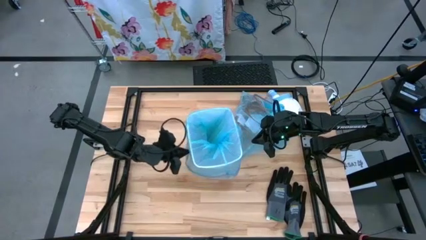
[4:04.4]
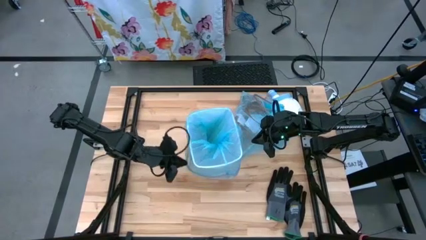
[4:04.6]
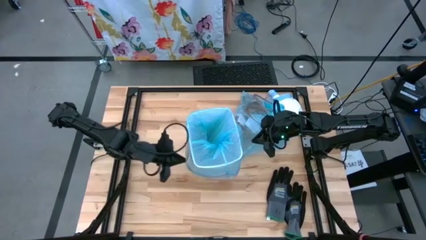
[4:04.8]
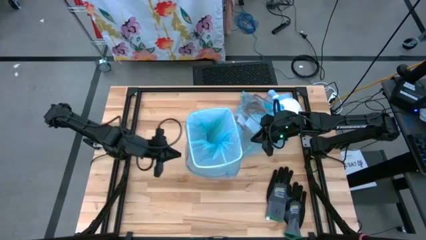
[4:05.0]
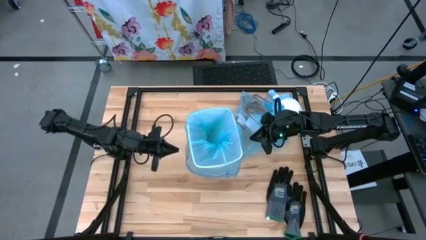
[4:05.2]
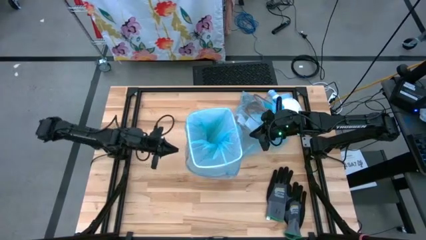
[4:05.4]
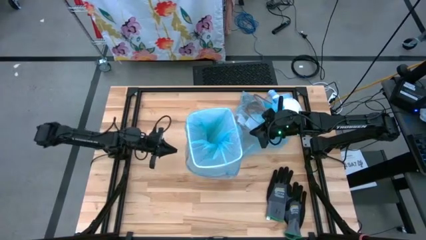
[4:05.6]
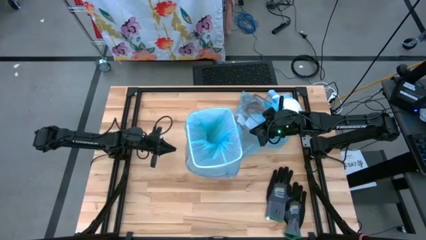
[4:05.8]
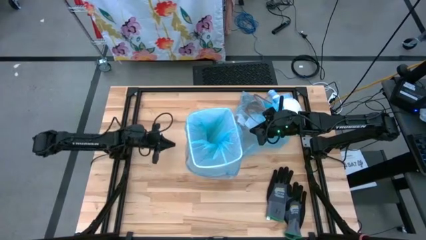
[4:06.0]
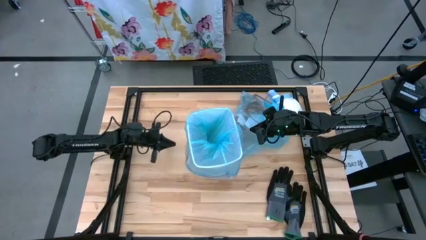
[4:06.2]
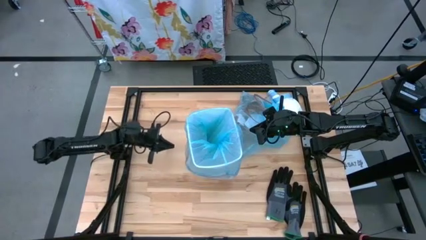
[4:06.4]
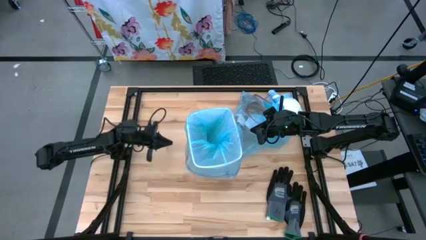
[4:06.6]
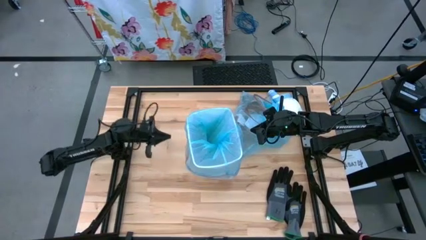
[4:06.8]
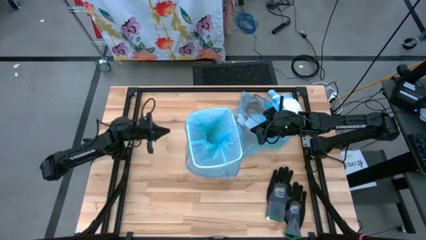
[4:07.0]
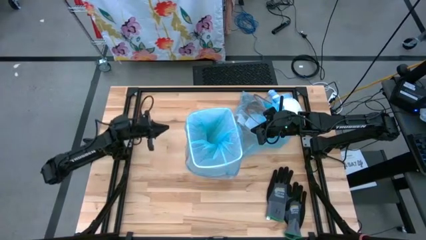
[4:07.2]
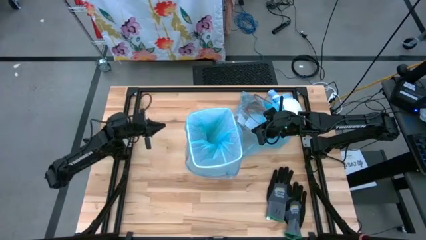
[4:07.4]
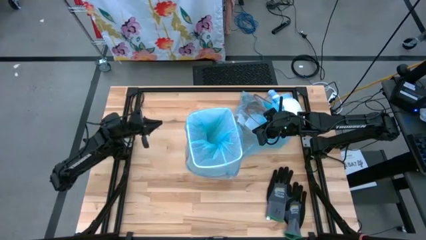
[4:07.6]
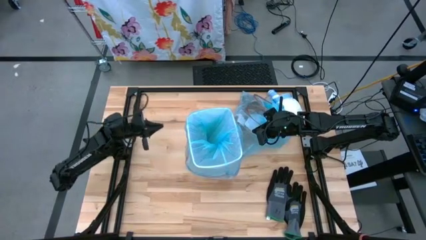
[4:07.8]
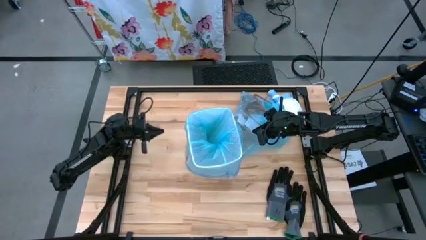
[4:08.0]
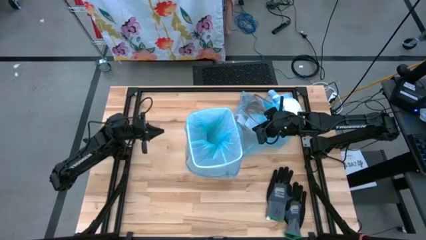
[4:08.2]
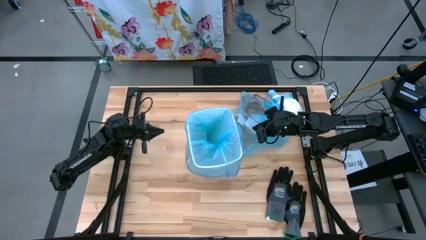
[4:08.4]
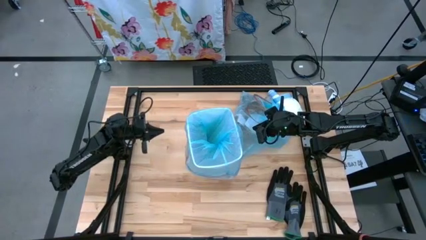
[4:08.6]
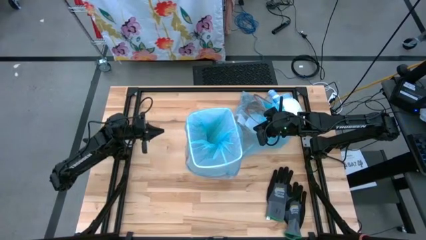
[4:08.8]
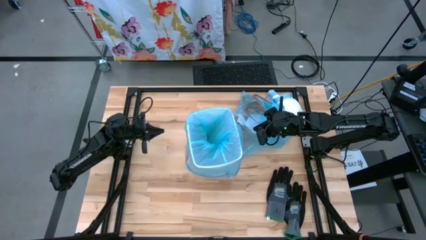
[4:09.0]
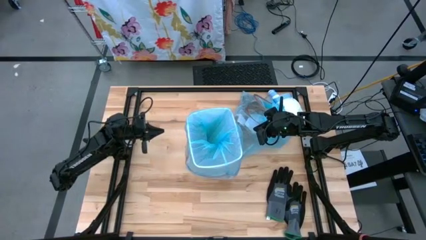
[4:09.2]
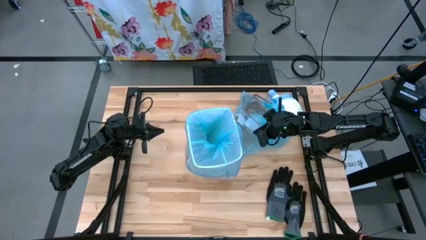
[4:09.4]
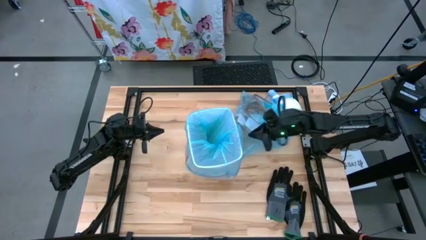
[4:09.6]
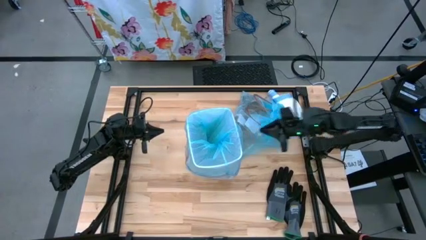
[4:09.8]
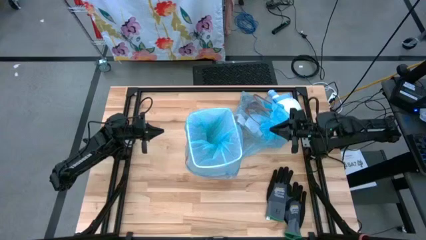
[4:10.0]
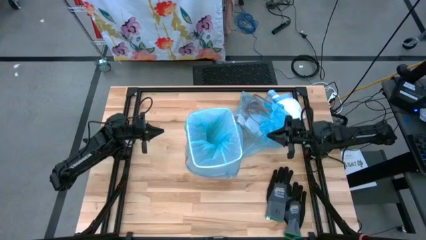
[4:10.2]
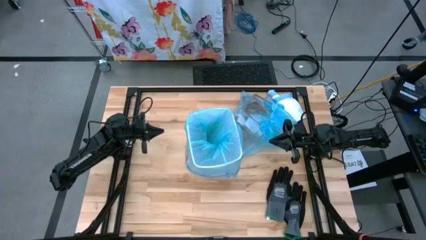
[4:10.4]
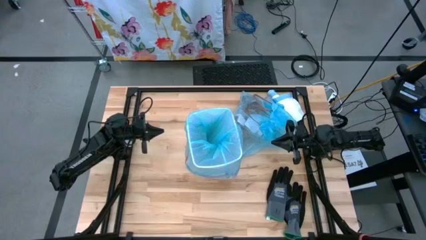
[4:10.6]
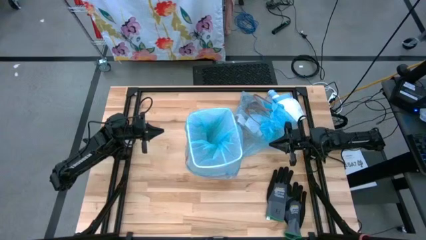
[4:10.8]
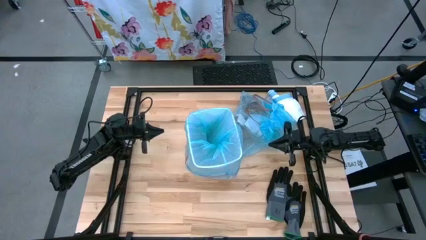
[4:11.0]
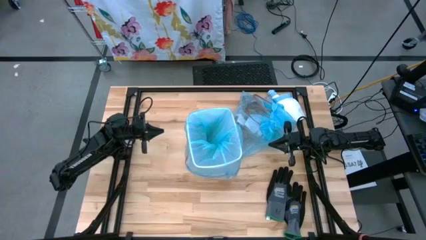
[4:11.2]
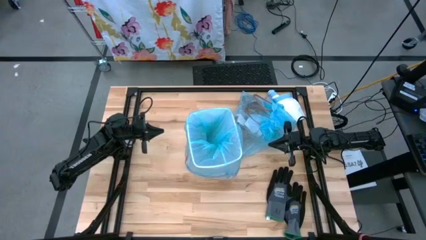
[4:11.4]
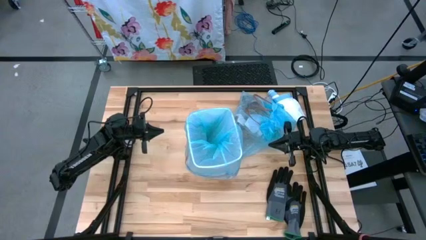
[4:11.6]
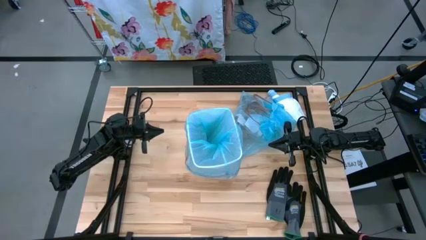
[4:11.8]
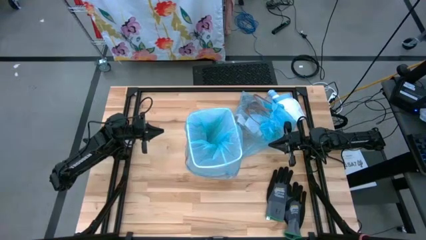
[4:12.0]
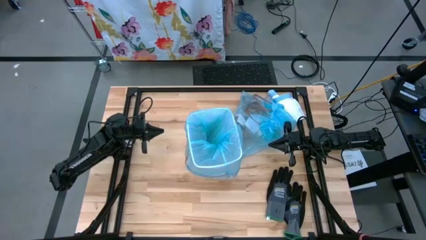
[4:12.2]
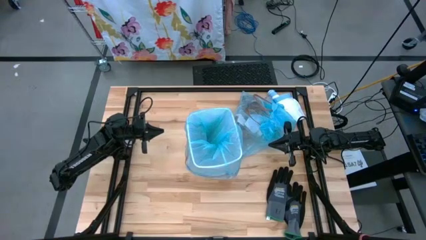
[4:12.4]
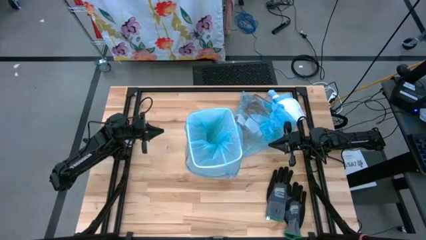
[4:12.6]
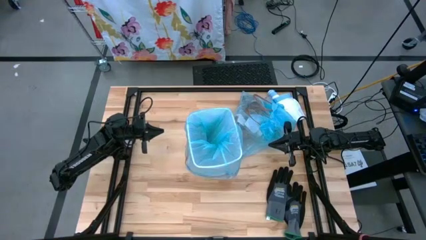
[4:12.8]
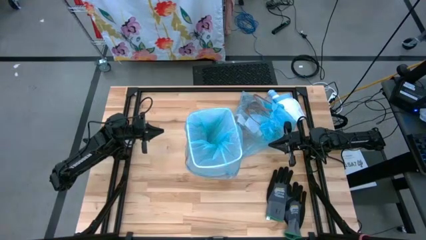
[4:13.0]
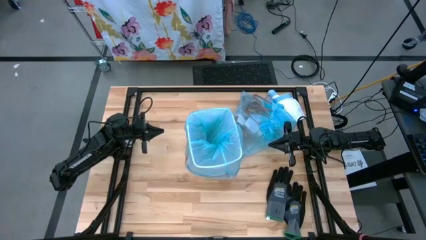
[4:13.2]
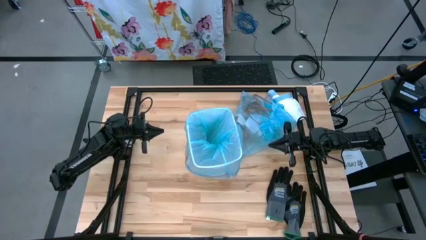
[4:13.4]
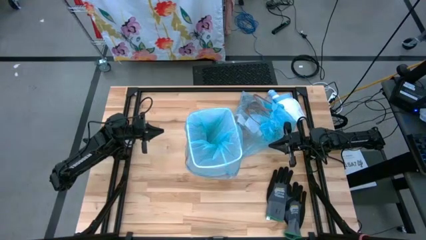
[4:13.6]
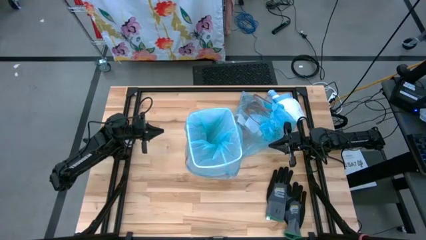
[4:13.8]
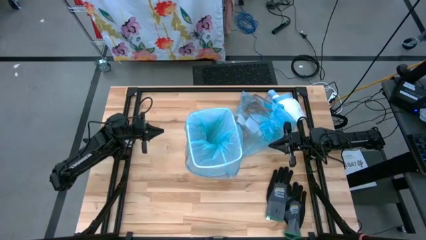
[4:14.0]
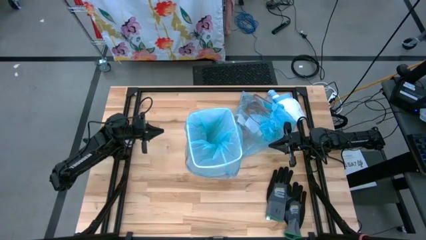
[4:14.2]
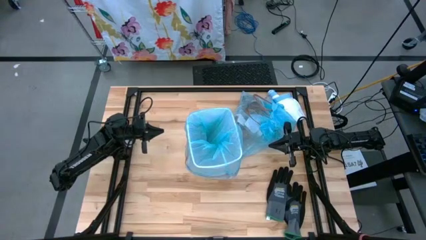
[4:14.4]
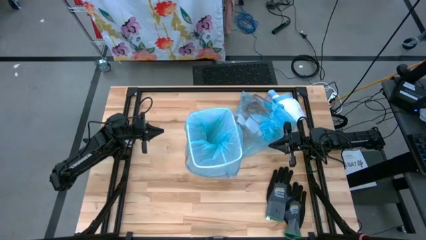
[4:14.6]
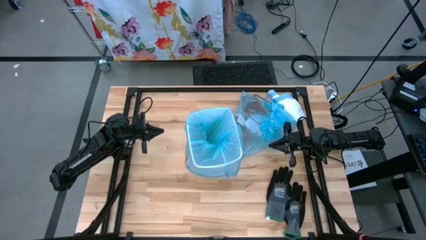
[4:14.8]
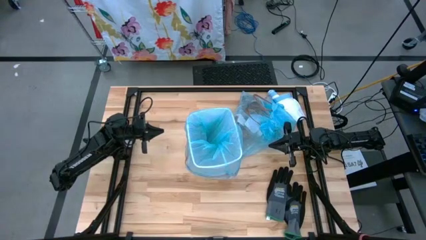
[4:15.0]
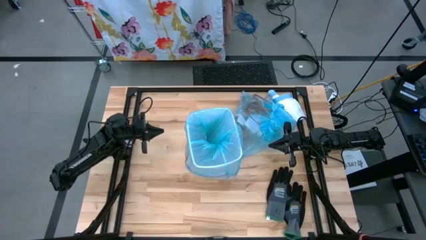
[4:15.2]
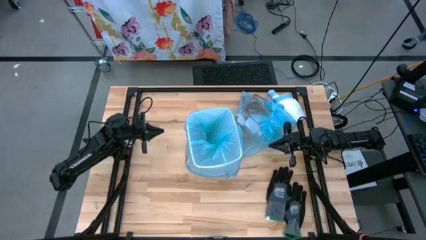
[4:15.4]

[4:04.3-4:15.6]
Task: place trash/remove bag and relplace
Return to Home Position

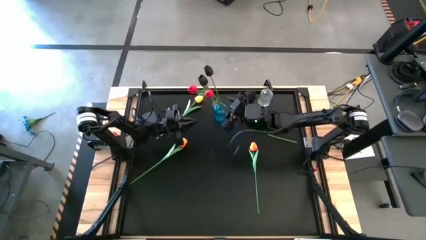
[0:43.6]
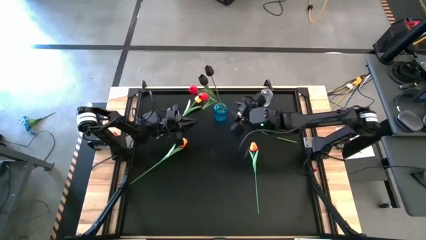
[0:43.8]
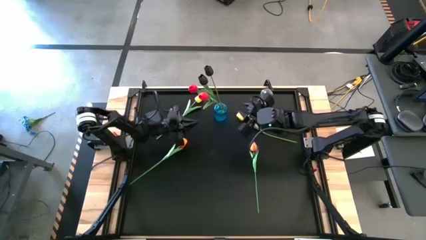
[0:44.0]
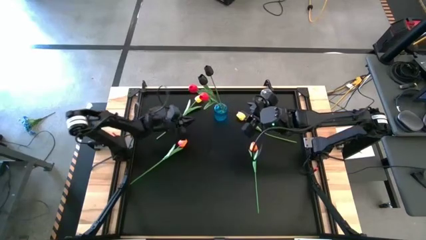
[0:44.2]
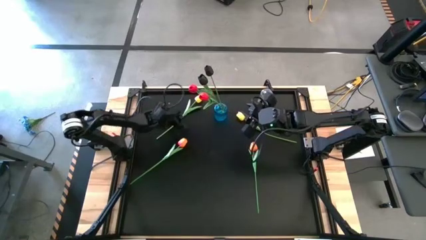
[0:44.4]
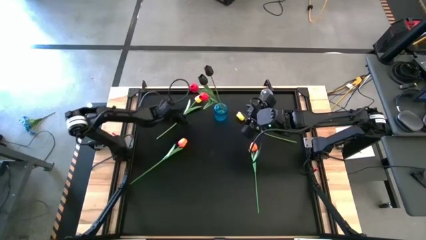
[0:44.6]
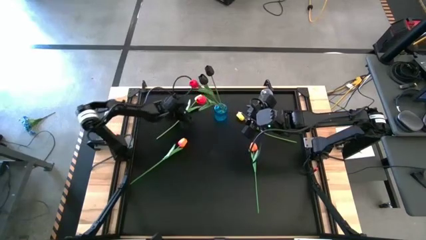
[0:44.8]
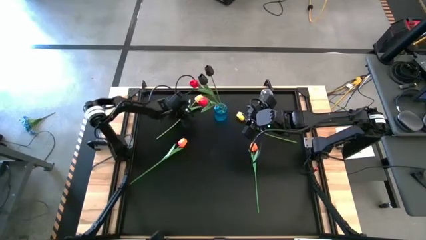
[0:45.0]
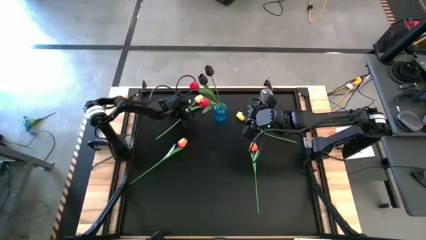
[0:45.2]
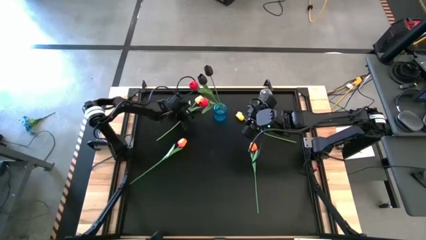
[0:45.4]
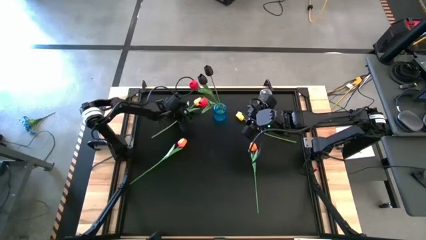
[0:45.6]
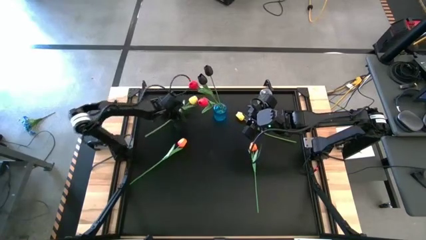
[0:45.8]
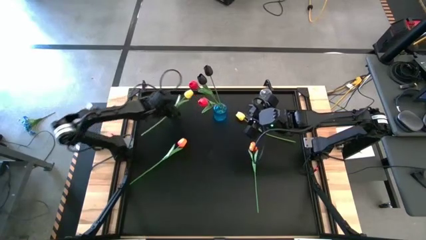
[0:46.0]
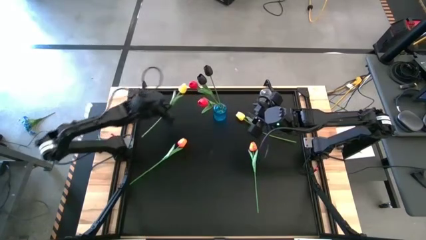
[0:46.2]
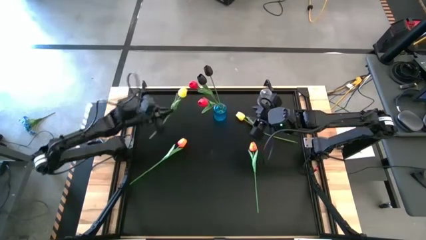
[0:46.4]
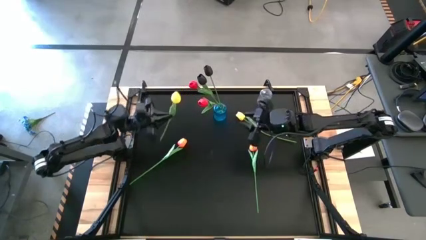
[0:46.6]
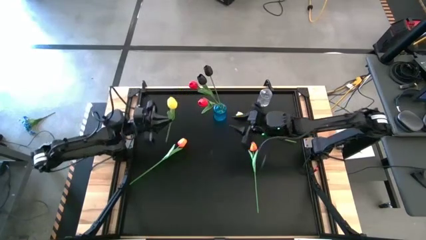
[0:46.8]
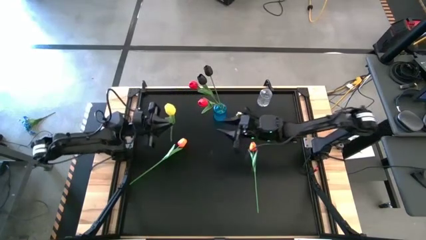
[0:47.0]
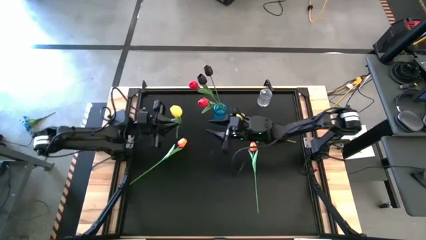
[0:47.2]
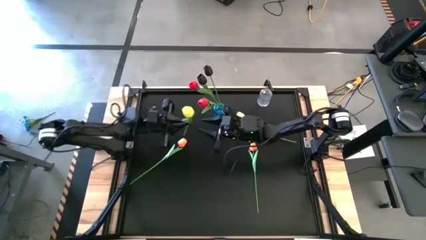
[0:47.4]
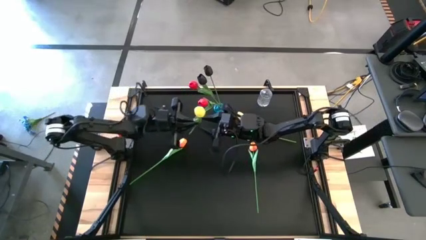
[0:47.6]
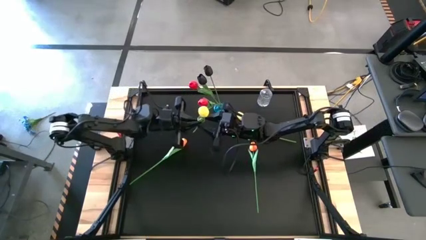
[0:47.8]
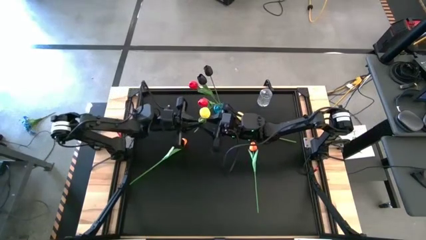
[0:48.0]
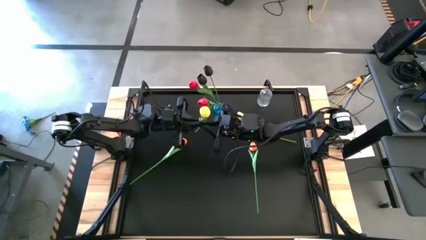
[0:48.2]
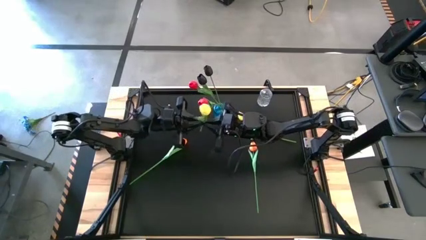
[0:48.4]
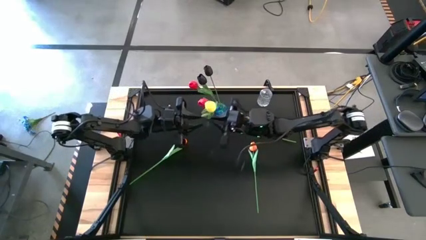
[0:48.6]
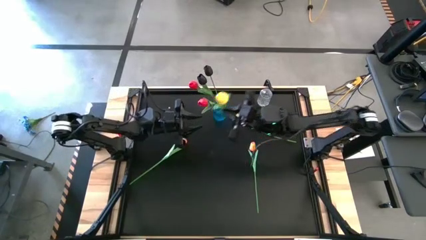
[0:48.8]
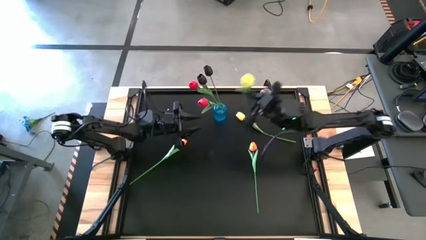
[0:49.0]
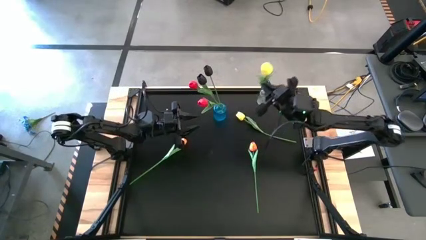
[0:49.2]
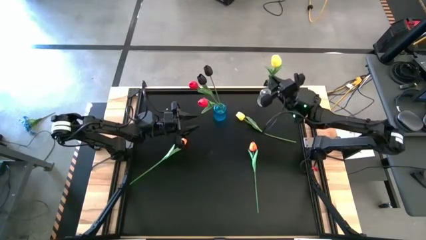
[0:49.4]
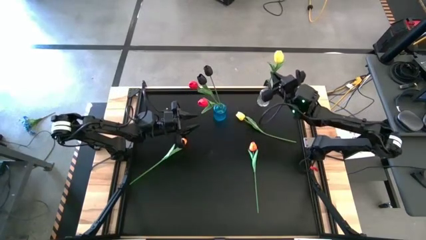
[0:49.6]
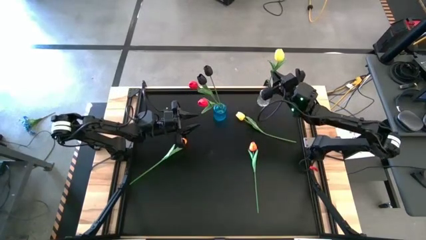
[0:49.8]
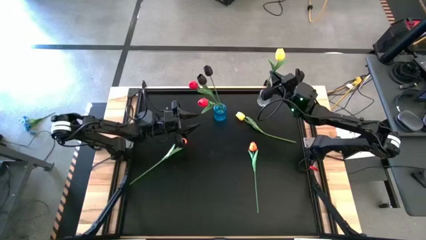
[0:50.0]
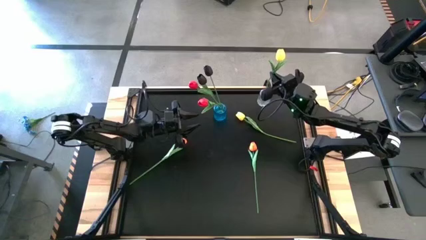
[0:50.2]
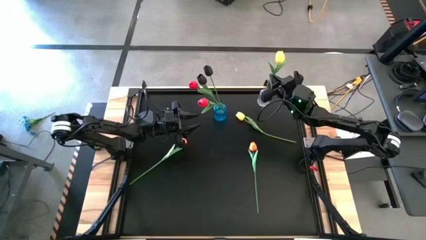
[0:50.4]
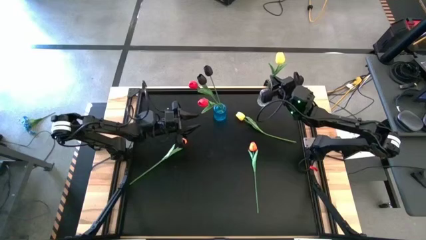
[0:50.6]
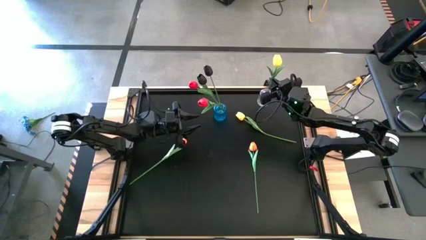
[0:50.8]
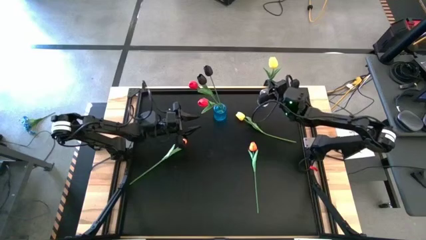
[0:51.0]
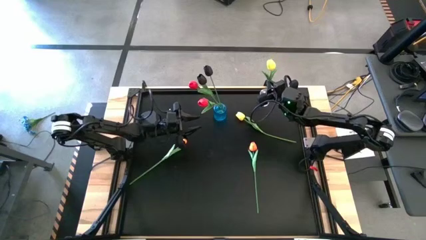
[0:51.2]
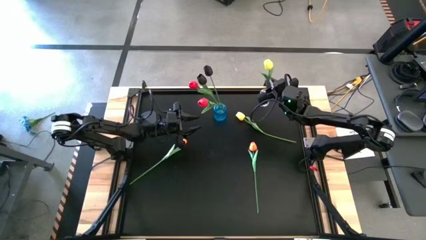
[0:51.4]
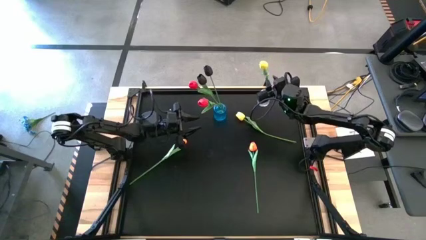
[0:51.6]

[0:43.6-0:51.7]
Task: Sort flowers into vase by color
Put the left yellow flower into the transparent vase
